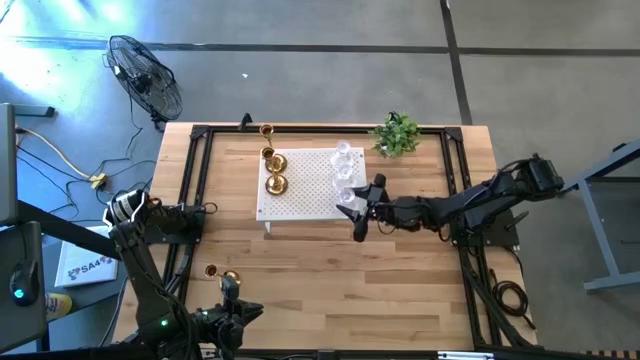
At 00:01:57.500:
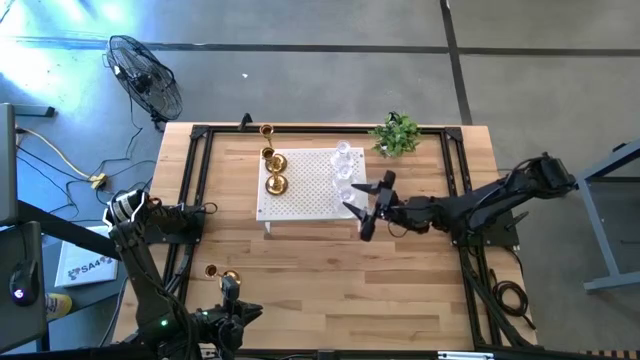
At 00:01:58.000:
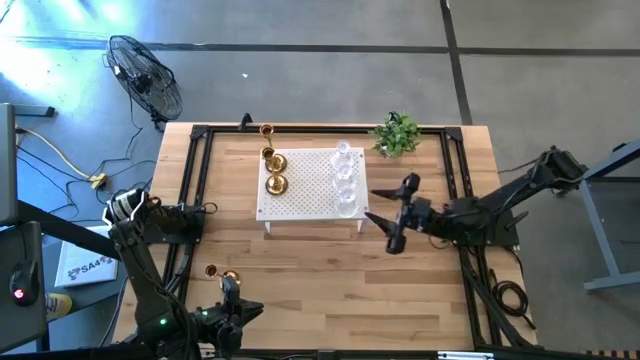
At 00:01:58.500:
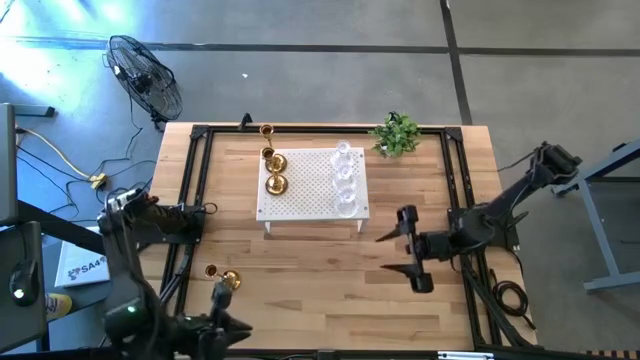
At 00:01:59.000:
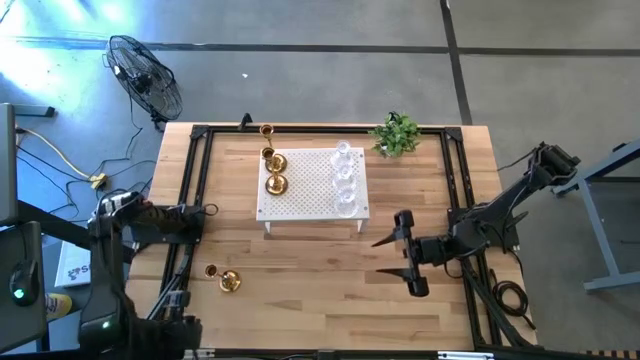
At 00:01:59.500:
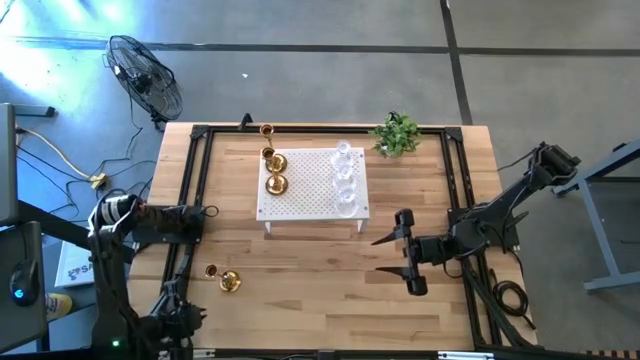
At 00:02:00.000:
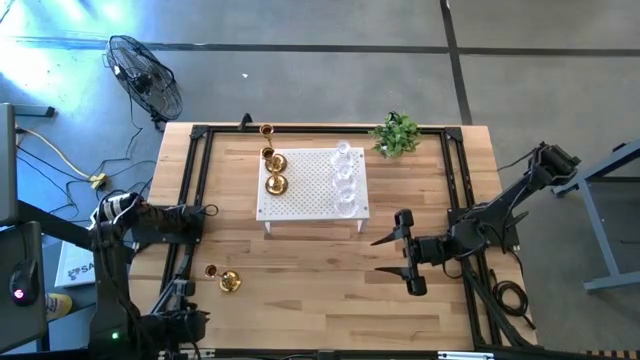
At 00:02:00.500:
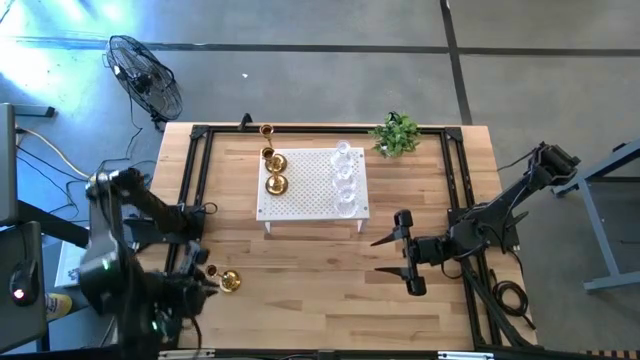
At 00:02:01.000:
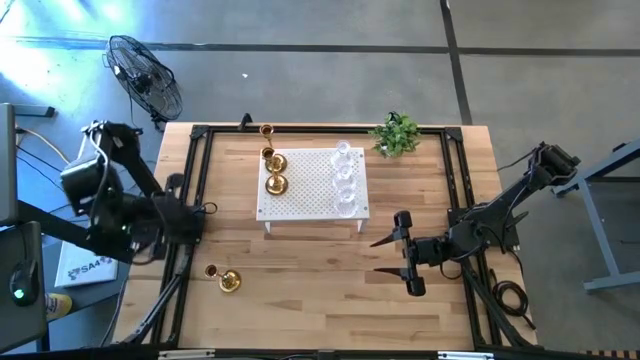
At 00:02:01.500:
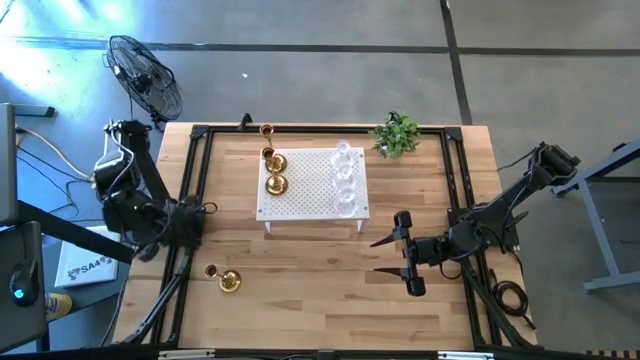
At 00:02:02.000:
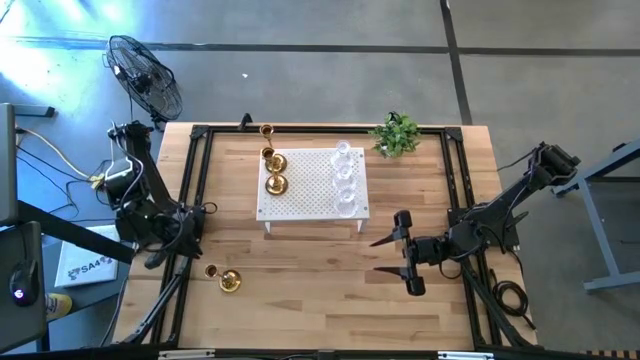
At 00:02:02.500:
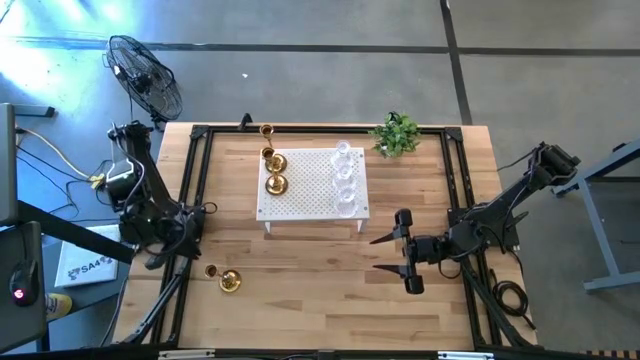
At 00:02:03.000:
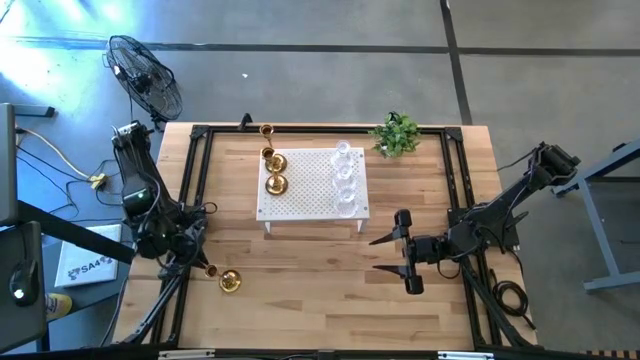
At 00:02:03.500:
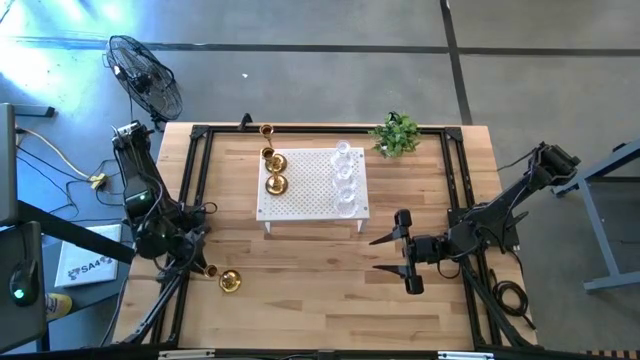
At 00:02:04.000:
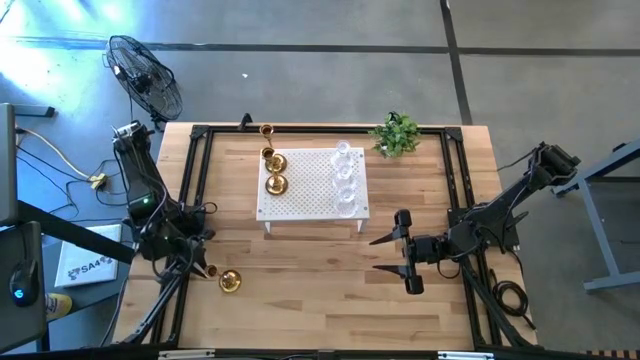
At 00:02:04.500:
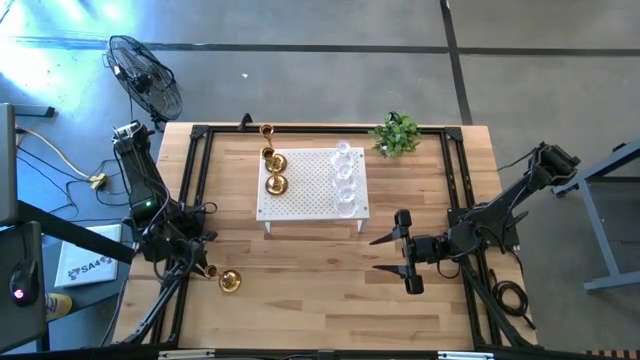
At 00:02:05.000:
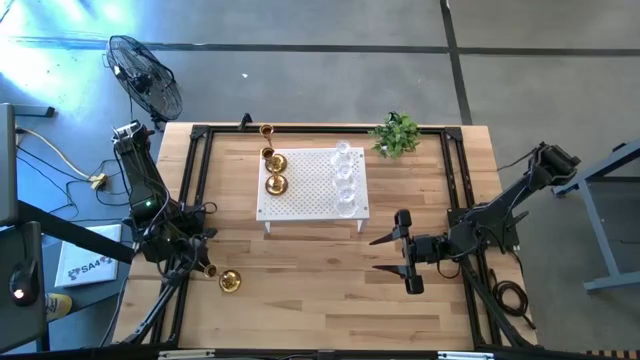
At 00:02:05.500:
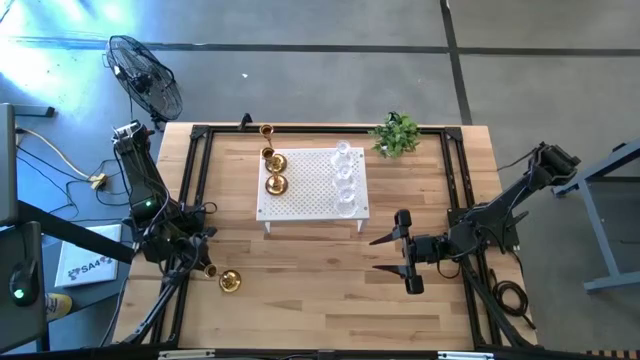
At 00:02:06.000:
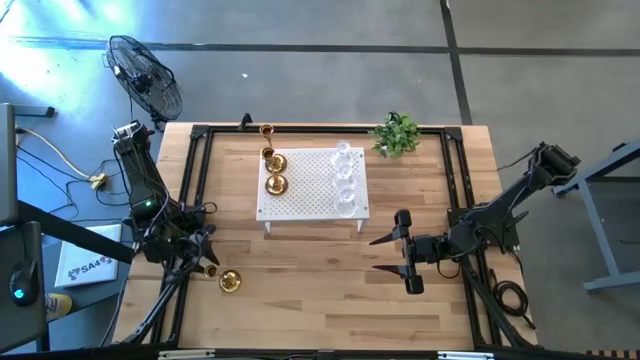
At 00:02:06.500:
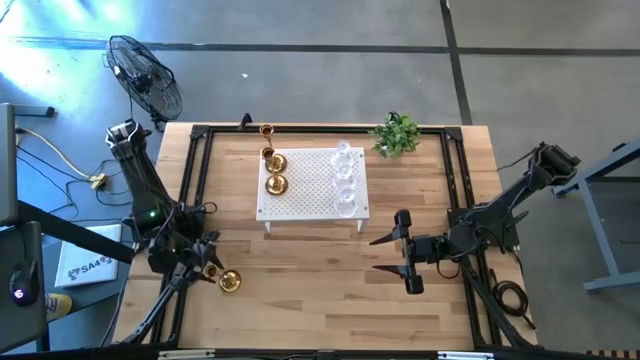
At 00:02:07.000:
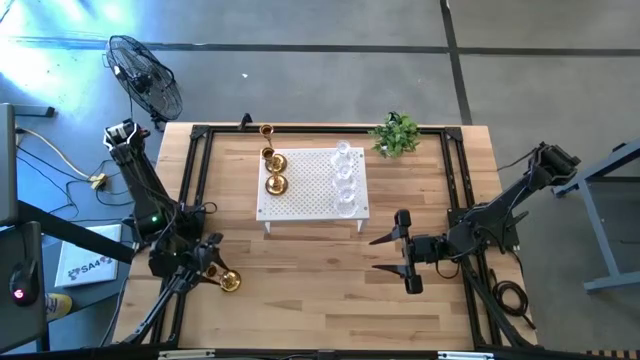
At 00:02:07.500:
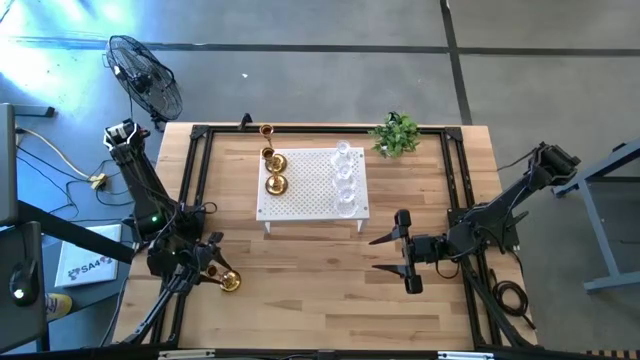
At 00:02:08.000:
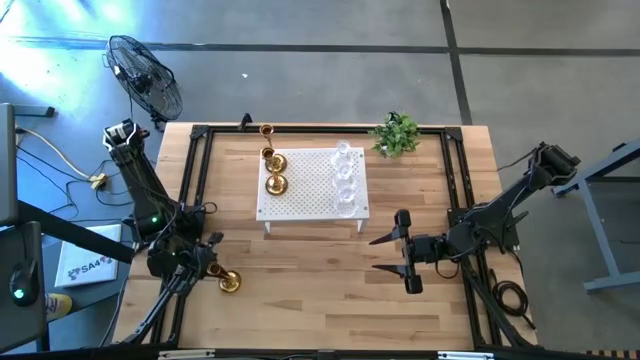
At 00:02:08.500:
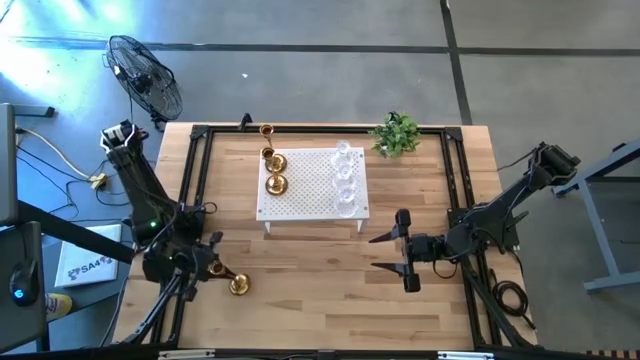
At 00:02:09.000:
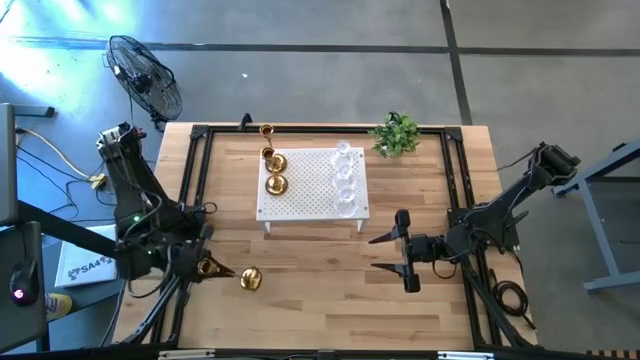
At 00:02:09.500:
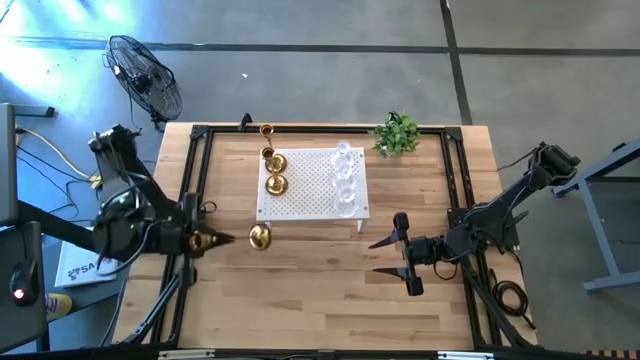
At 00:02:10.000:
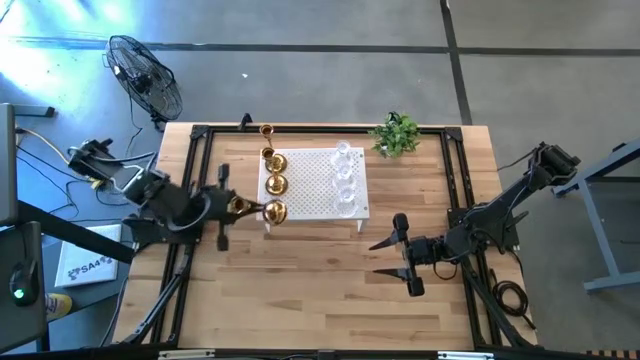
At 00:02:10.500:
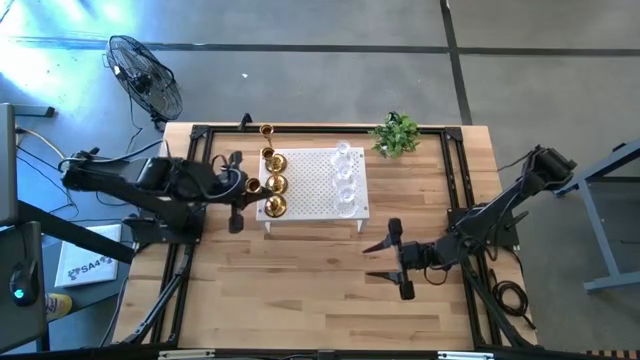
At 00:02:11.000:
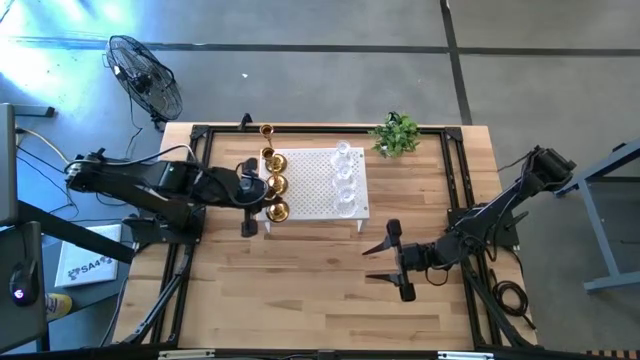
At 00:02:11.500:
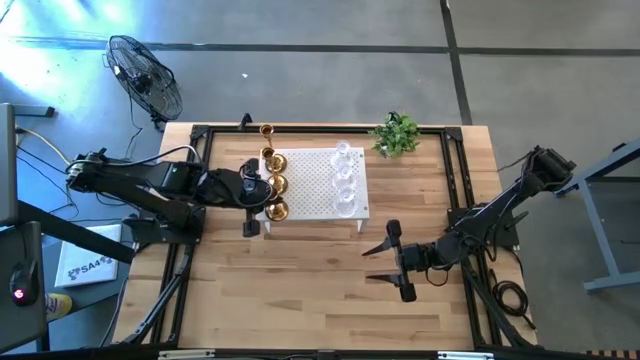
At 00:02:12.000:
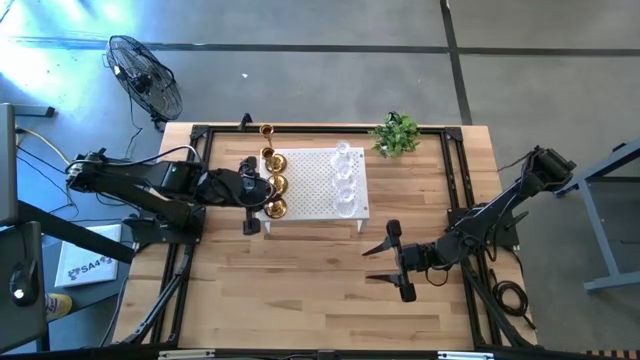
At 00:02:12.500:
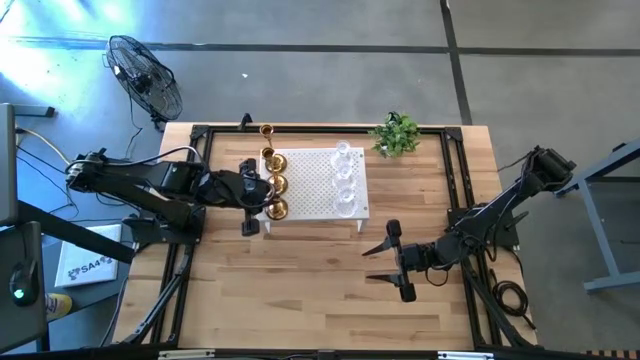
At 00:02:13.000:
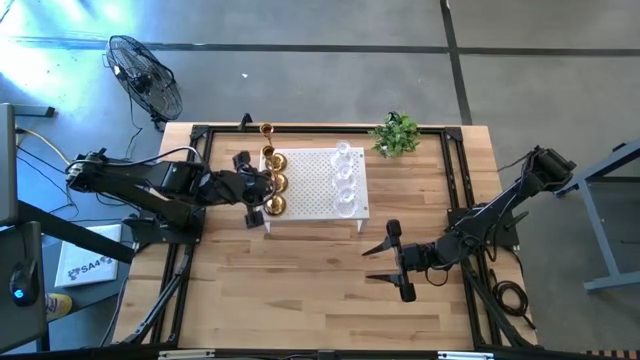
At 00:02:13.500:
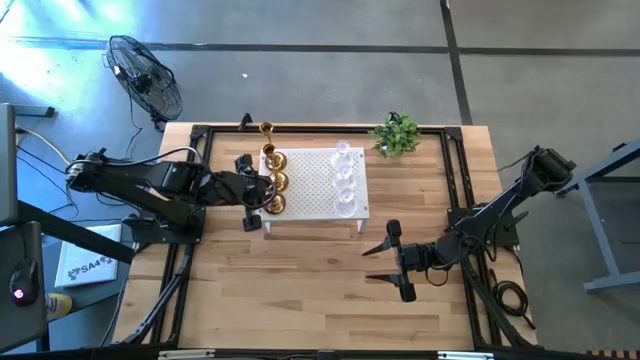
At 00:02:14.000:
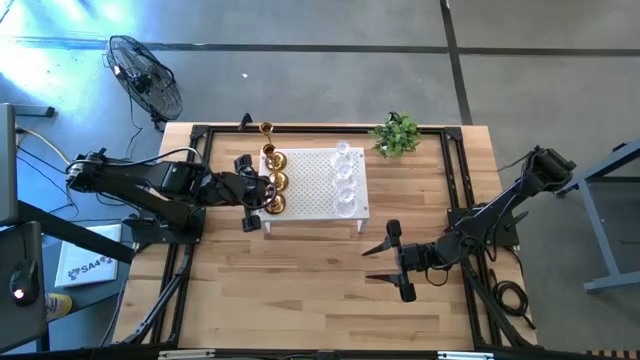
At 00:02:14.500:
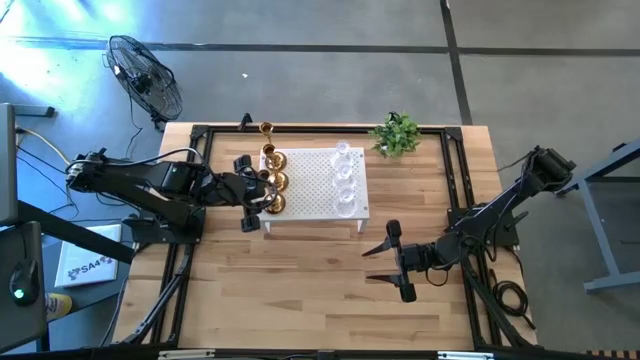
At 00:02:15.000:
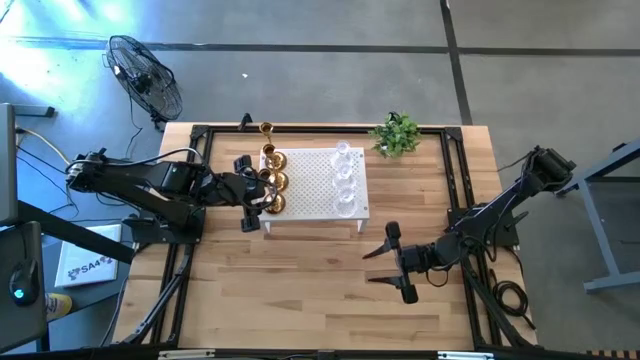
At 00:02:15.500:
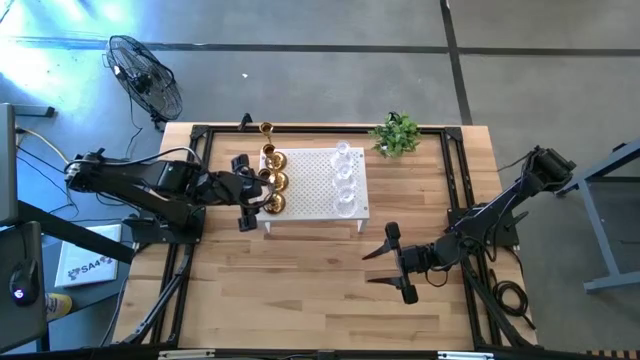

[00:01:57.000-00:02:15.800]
Task: Pick & Place candle stick holders
Put the gold candle holder on the shelf aligned with the other gold candle holders
